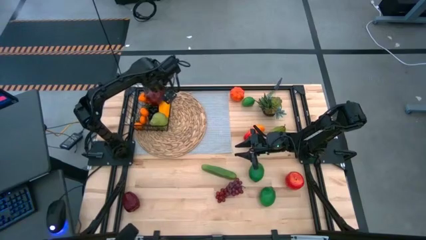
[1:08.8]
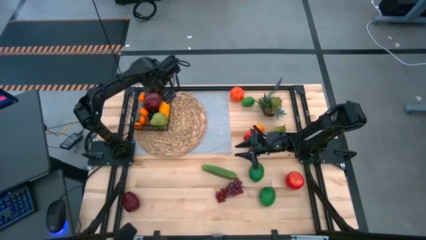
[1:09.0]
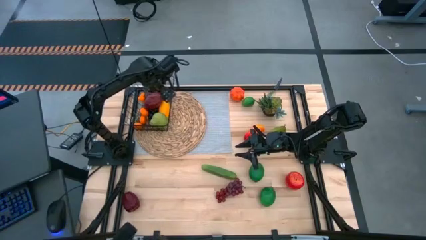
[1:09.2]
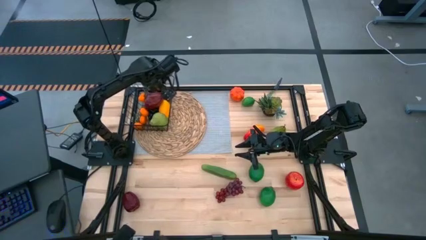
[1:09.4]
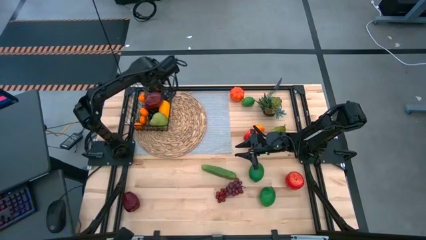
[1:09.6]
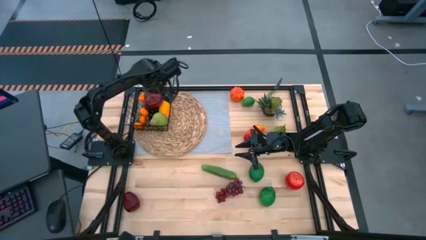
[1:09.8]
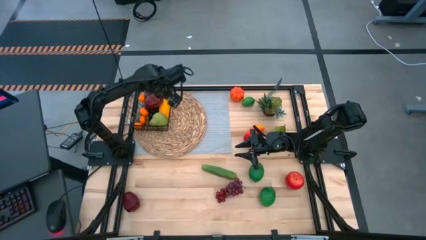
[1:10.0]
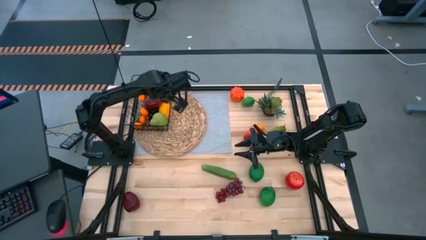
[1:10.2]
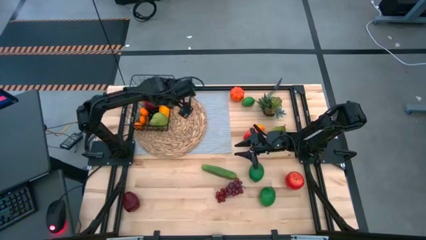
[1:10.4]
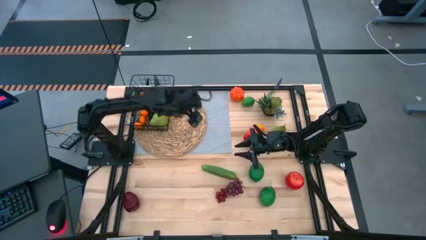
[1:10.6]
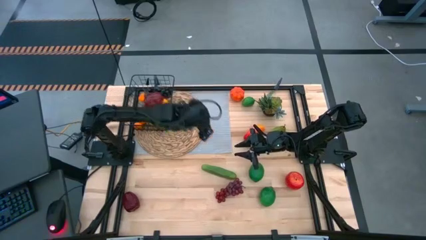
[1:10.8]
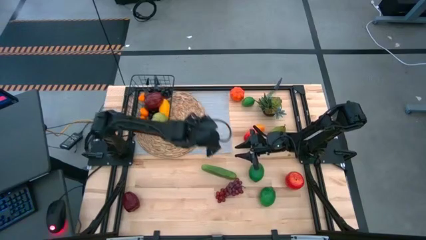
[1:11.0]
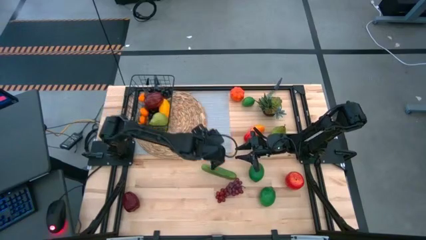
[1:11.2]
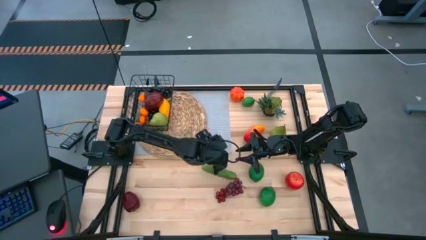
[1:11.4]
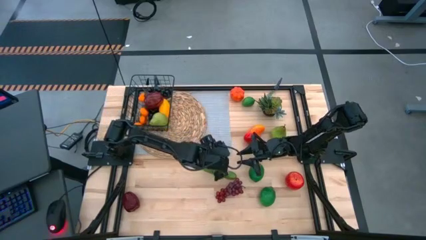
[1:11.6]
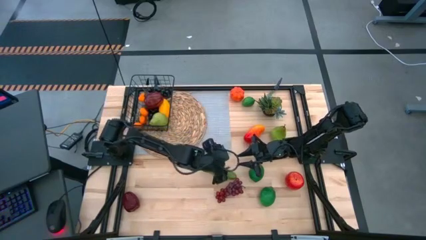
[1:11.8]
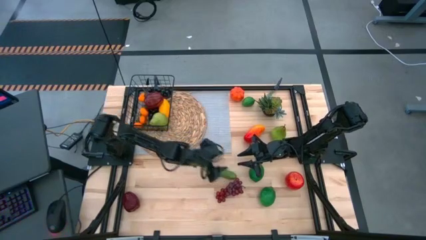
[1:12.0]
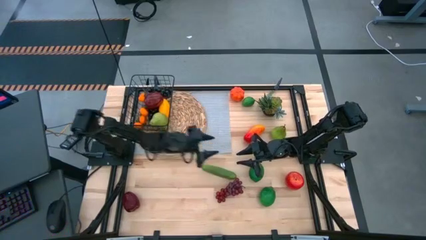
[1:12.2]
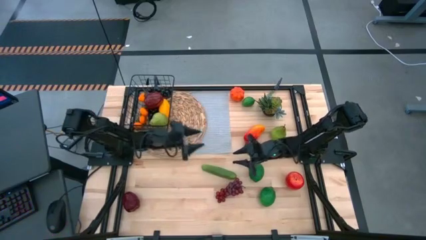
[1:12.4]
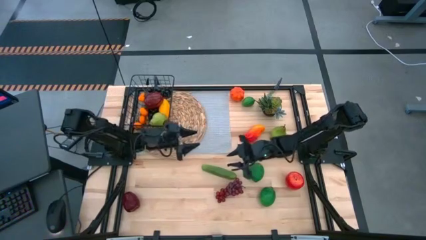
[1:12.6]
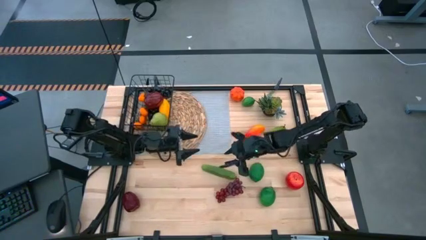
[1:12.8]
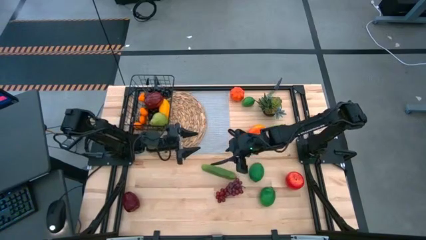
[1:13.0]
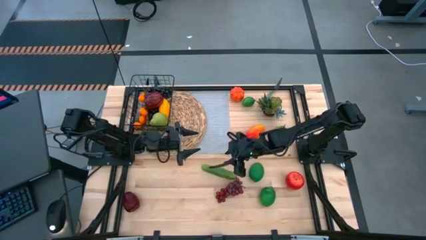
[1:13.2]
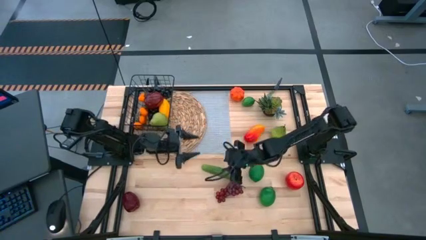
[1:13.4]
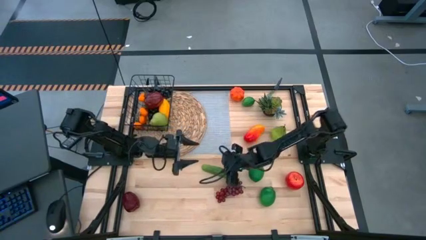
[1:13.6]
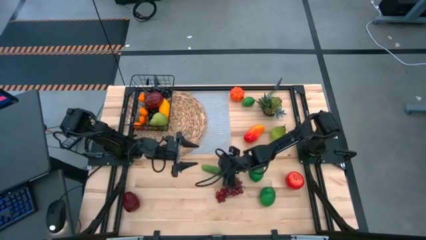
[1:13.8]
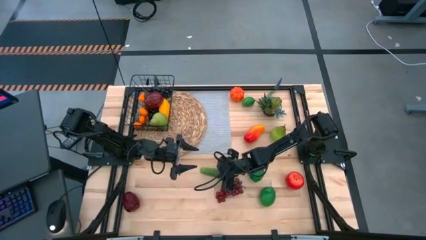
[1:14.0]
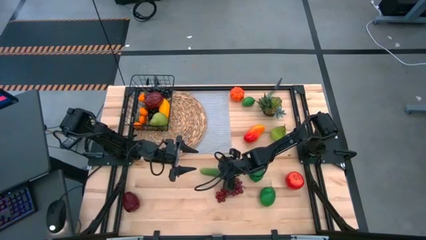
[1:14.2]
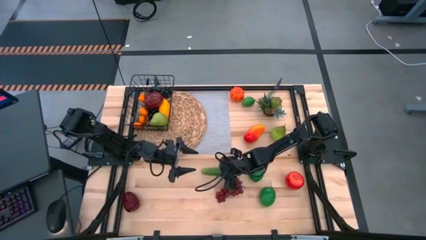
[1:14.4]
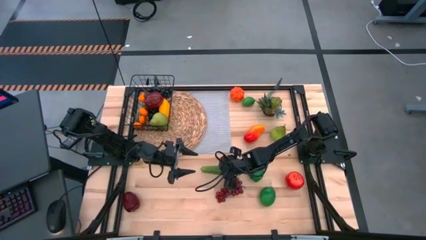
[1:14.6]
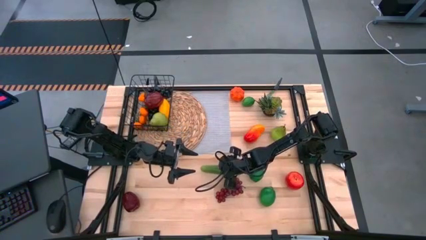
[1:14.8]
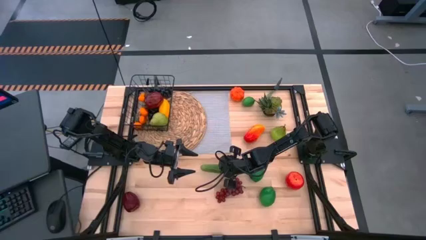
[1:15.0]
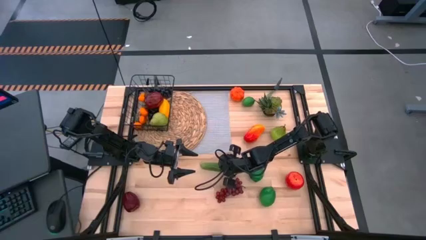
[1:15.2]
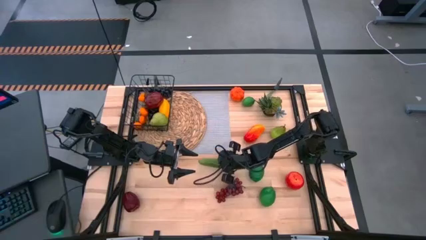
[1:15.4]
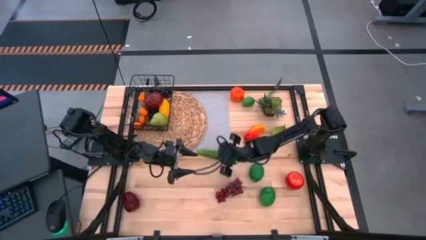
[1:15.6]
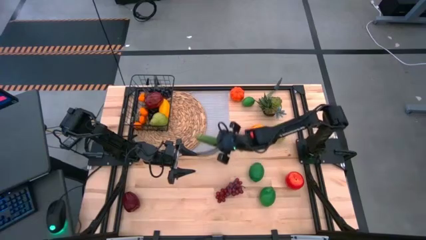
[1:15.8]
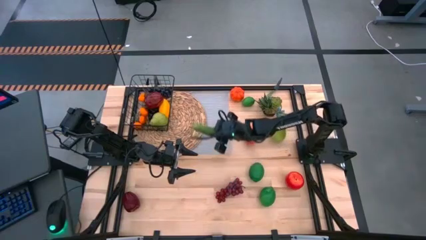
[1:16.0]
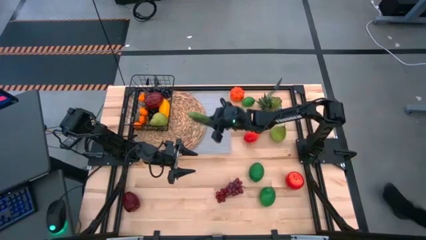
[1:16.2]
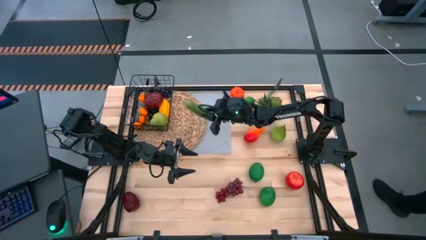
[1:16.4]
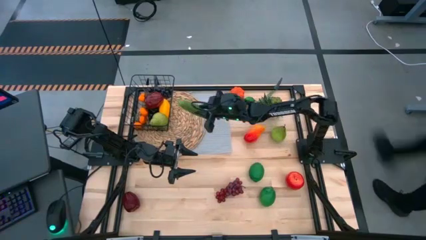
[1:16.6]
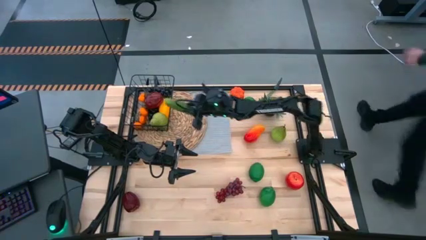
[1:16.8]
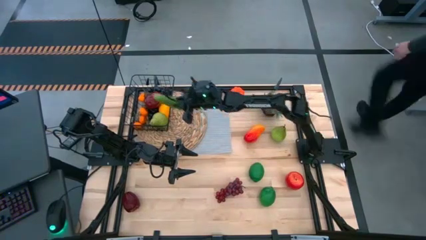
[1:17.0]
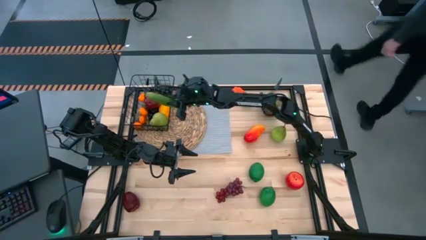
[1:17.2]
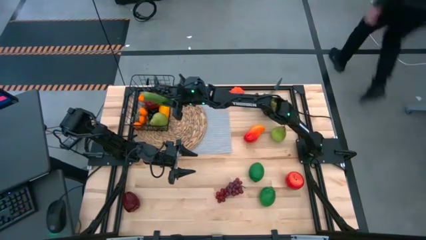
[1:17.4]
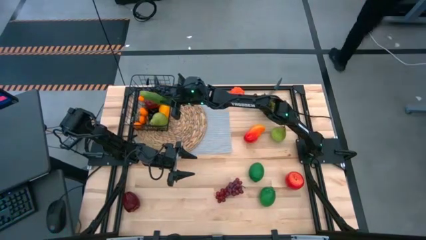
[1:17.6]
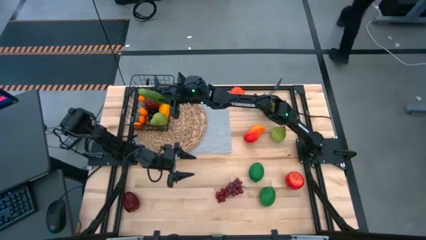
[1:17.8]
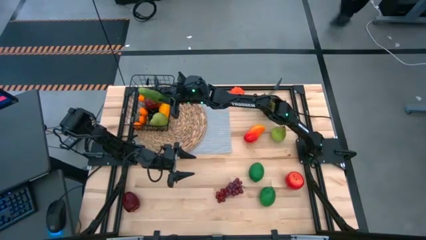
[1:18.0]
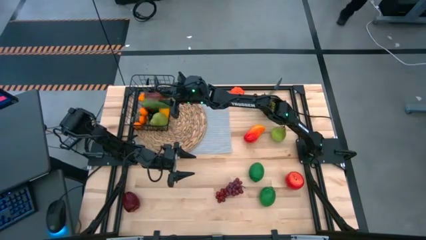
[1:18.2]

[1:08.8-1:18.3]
Task: Build produce basket
Put the green cucumber into the wire basket
